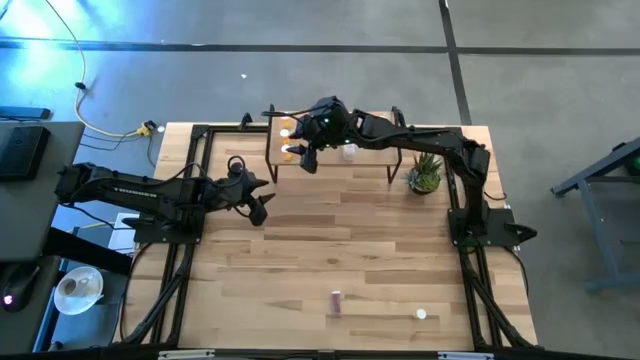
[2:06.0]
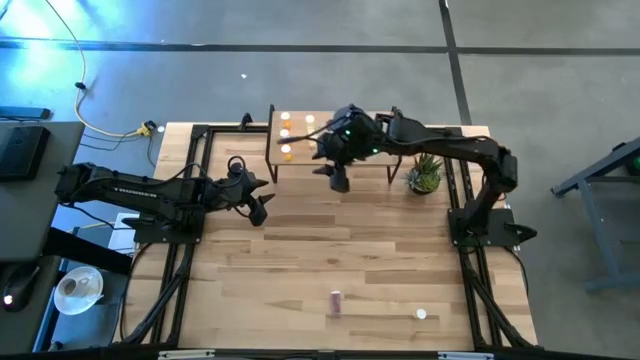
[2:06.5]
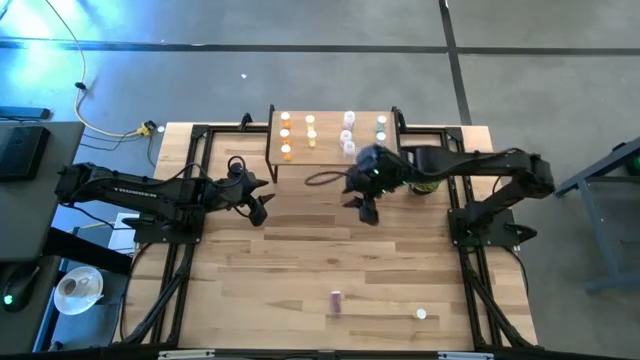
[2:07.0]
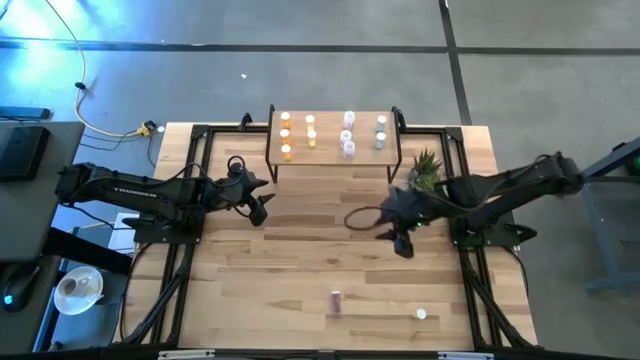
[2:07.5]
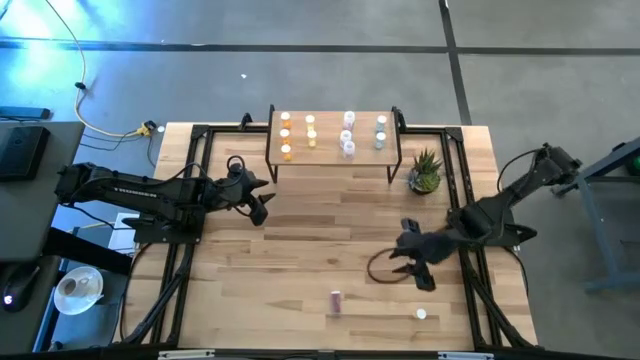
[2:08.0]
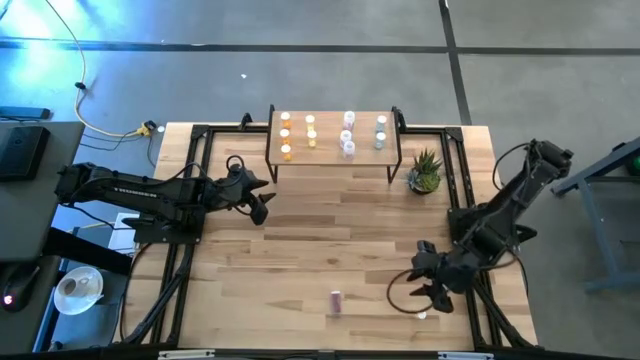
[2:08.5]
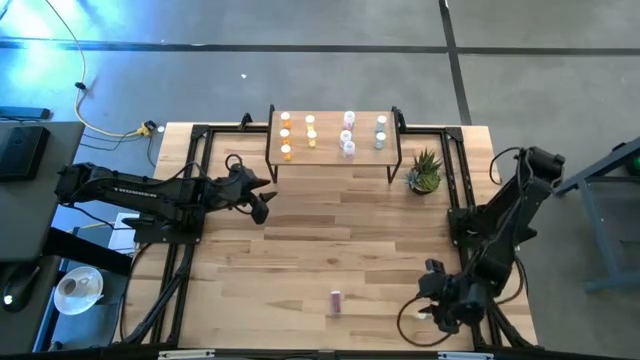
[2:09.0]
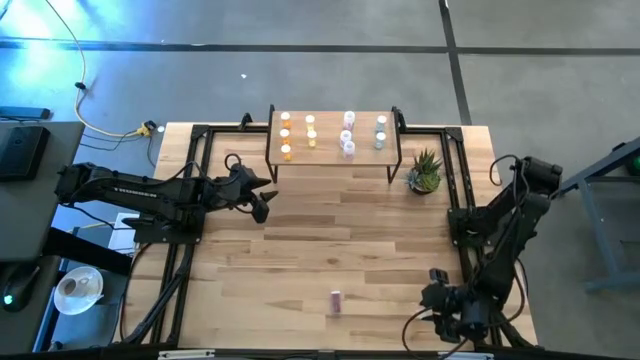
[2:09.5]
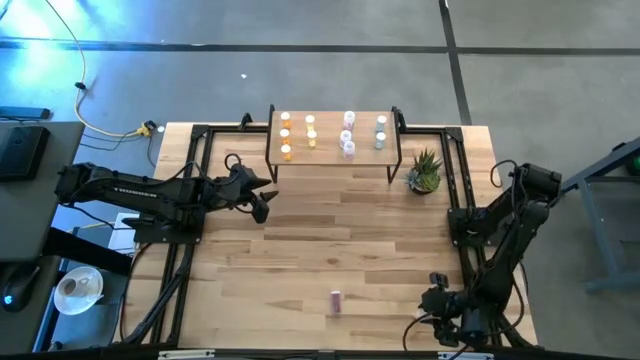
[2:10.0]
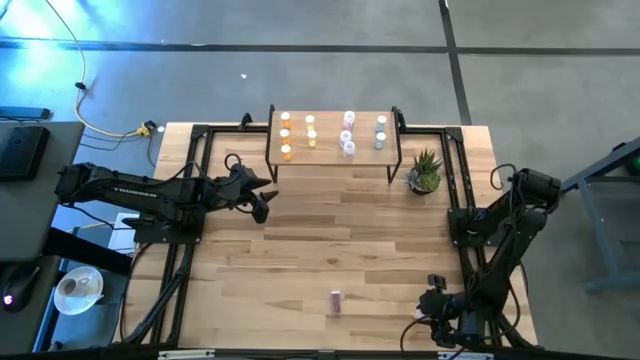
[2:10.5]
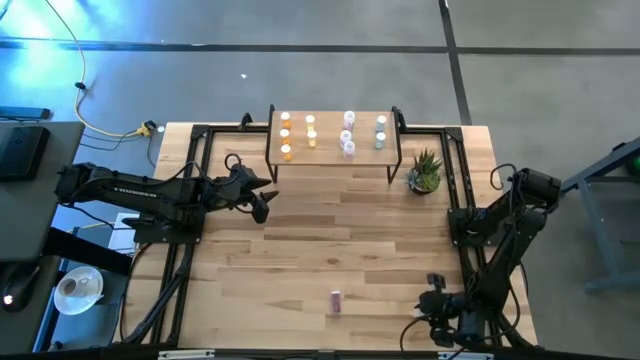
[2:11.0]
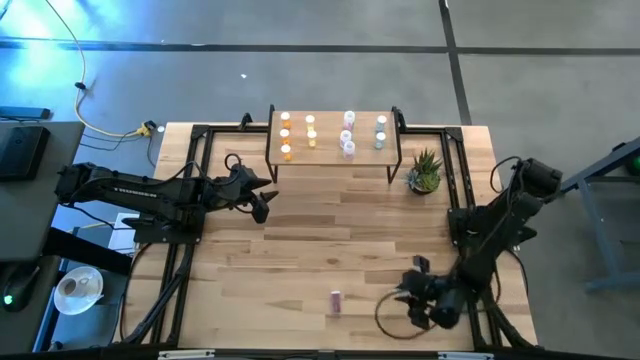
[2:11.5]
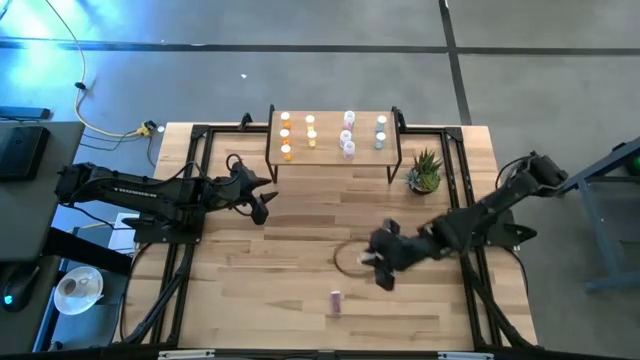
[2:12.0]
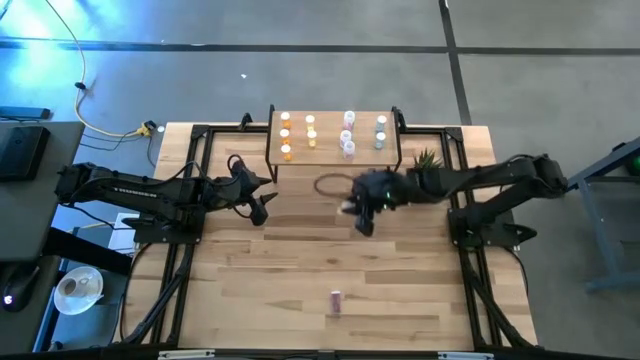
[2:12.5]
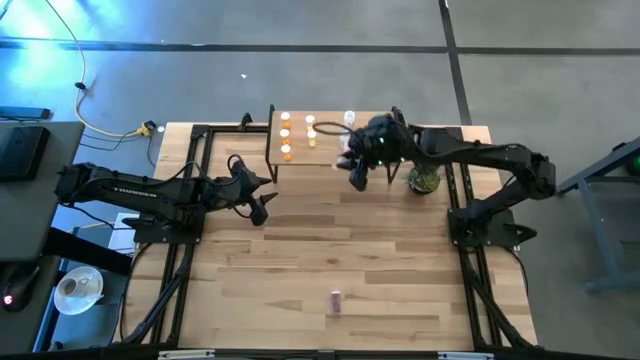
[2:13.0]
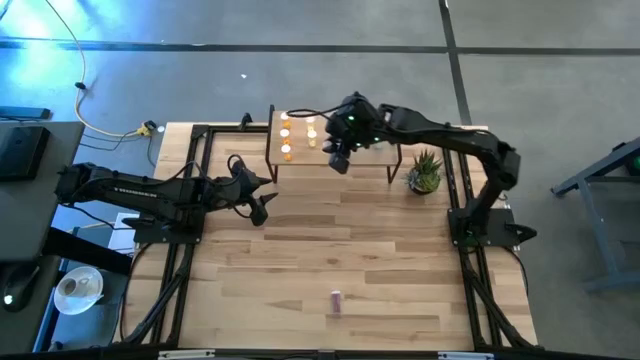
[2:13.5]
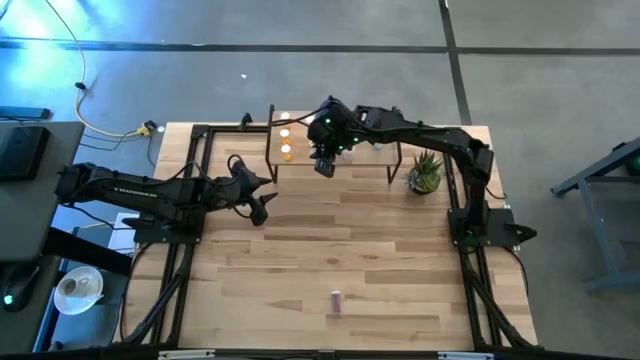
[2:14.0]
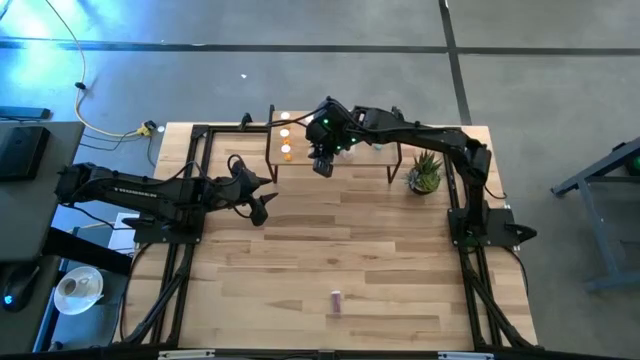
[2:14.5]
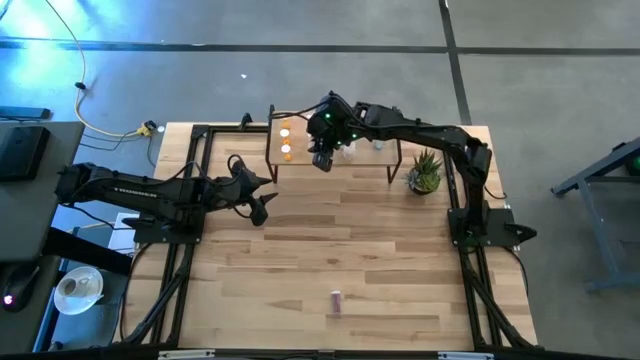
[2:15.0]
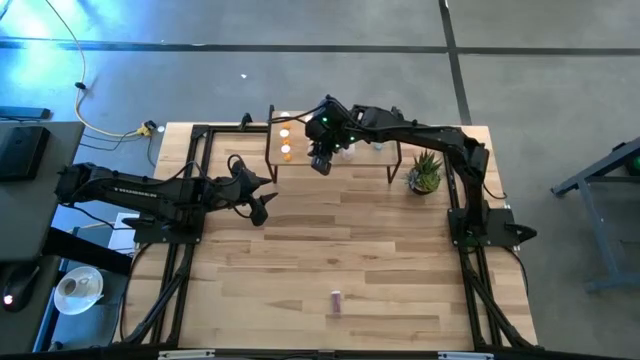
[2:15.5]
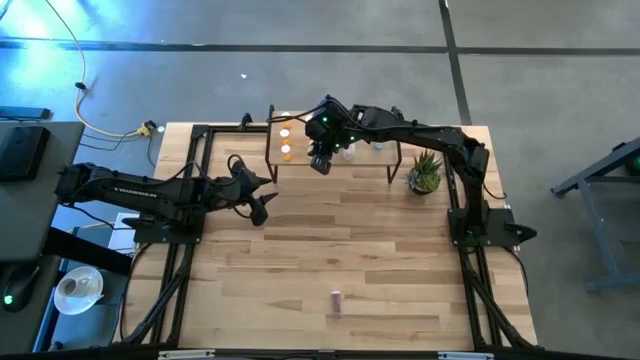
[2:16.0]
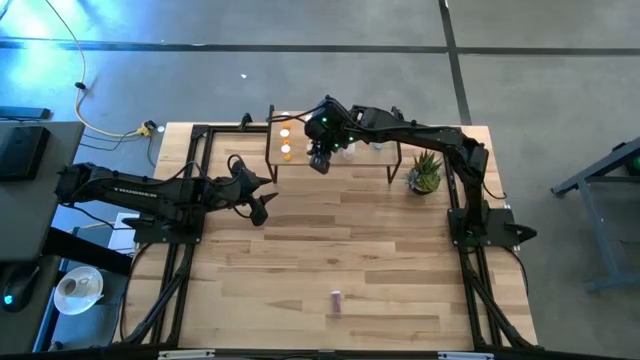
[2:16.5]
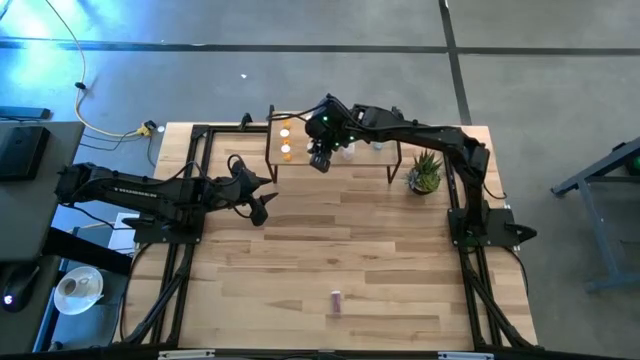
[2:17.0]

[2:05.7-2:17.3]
Task: Pick and place medicine bottles onto shelf by color
Put the yellow pill bottle on the shelf aligned with the other yellow pill bottles

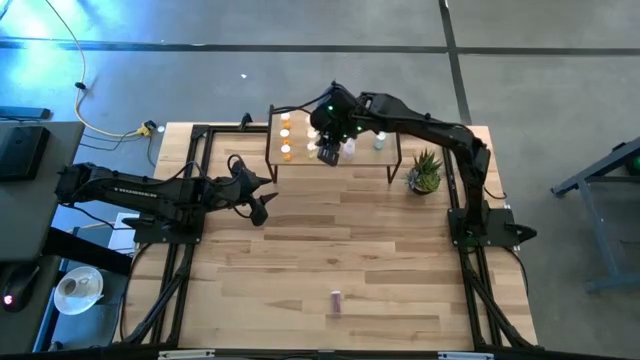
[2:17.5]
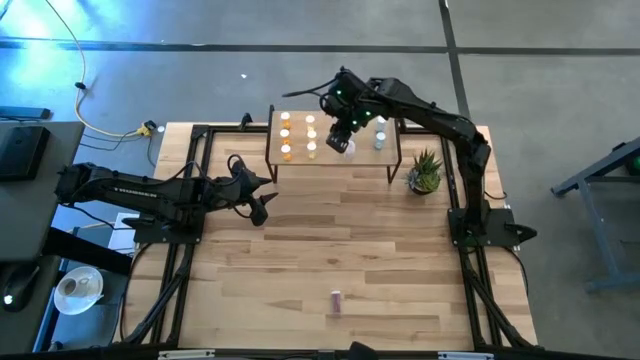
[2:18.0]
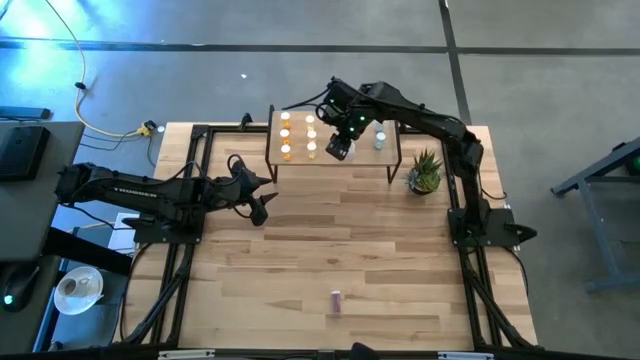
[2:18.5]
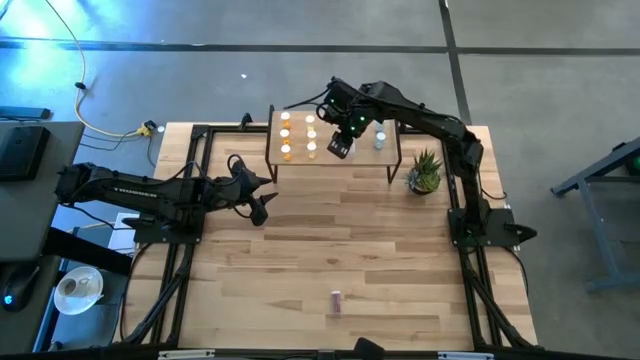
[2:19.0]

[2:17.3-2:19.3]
Adjust the middle white pill bottle on the shelf

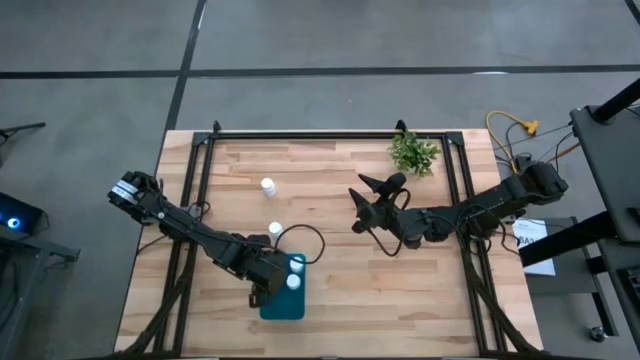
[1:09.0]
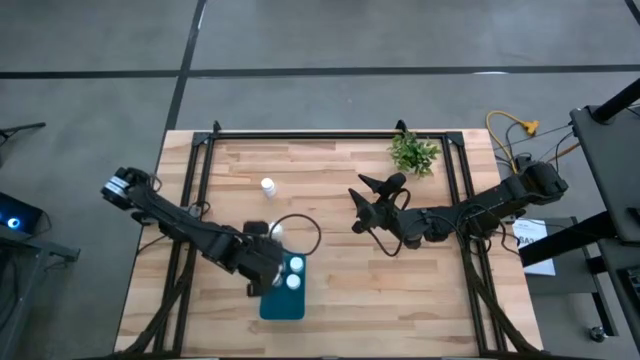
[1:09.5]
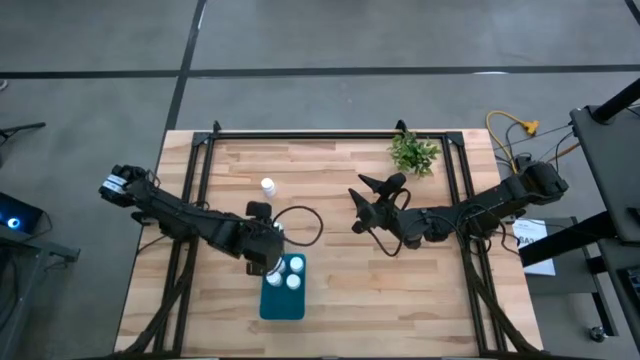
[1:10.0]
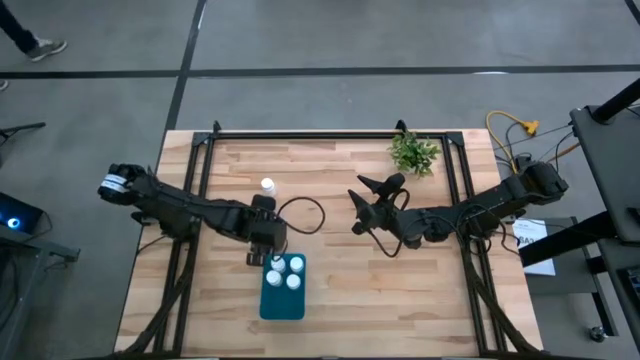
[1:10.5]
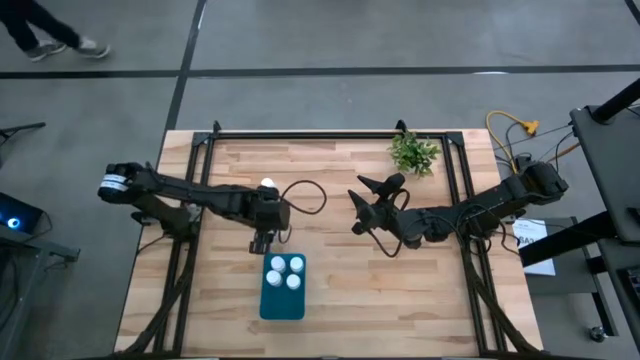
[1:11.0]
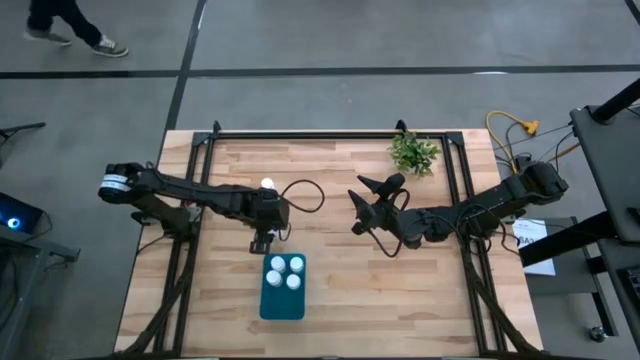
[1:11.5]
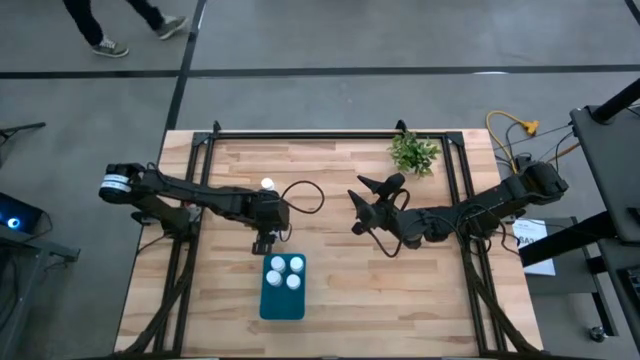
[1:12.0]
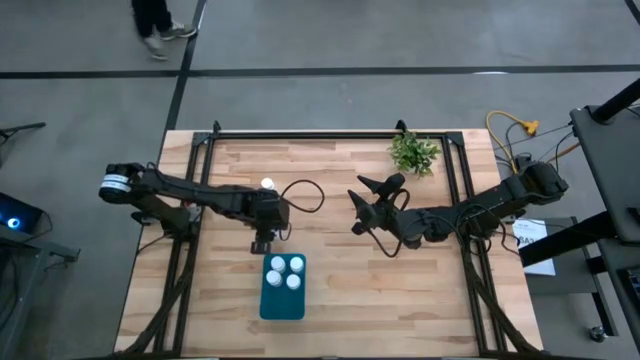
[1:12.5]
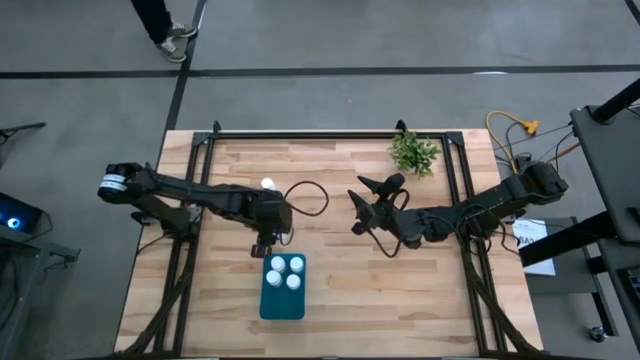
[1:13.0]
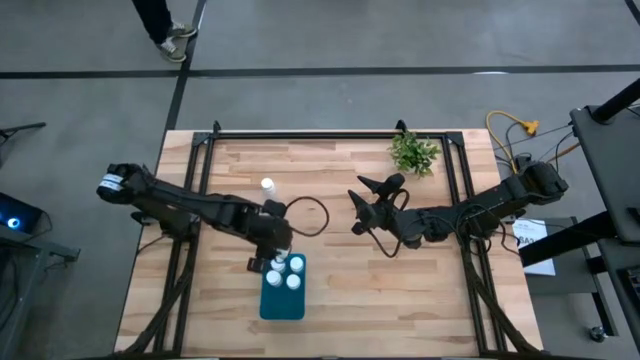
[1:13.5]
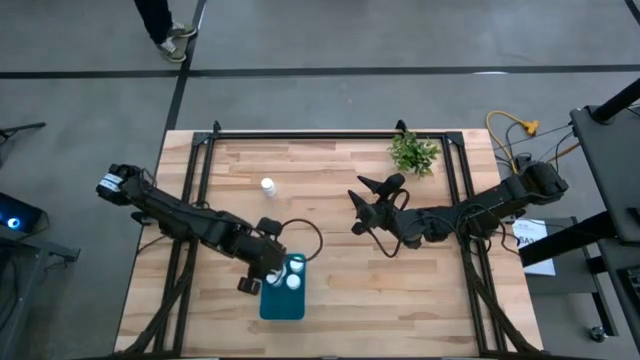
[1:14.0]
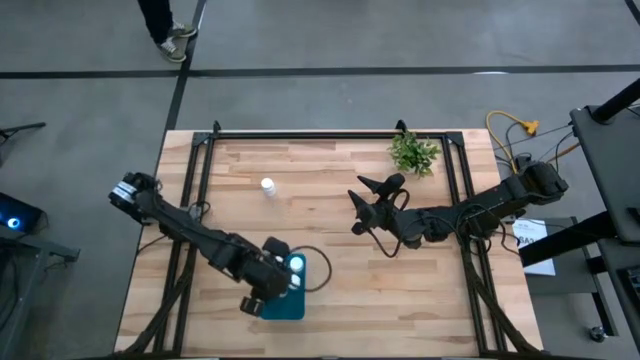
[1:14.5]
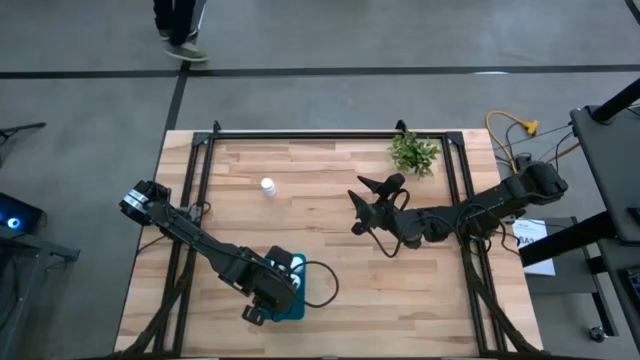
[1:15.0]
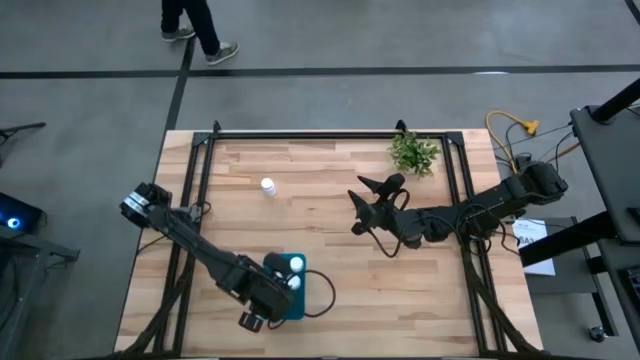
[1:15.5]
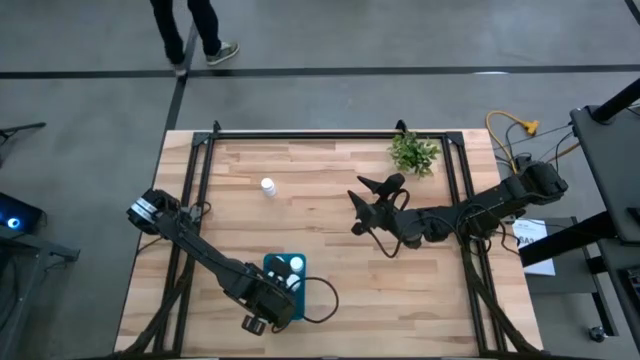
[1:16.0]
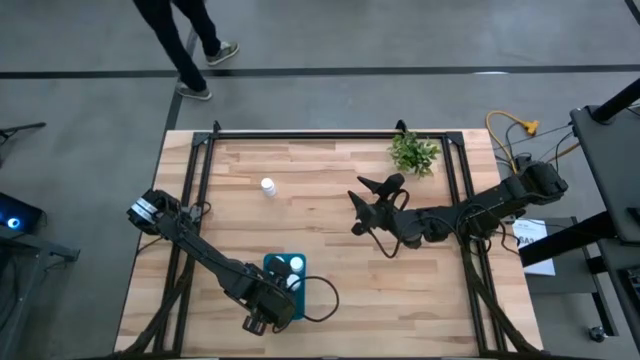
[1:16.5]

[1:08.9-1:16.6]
Task: Pick and place pill bottles into a basket
Put the white pill bottle into the blue bin

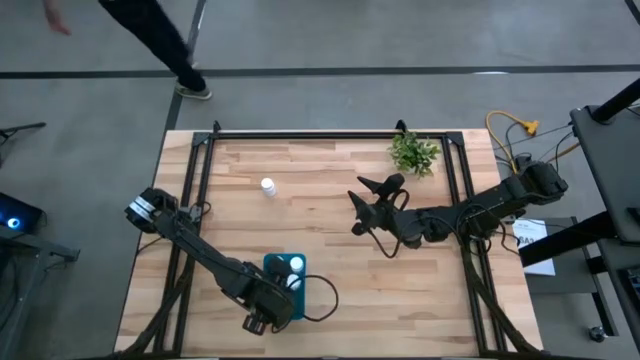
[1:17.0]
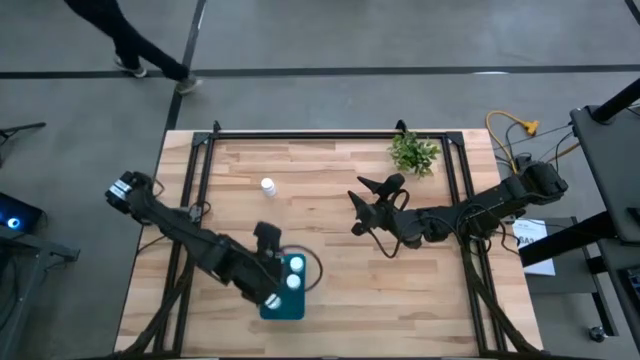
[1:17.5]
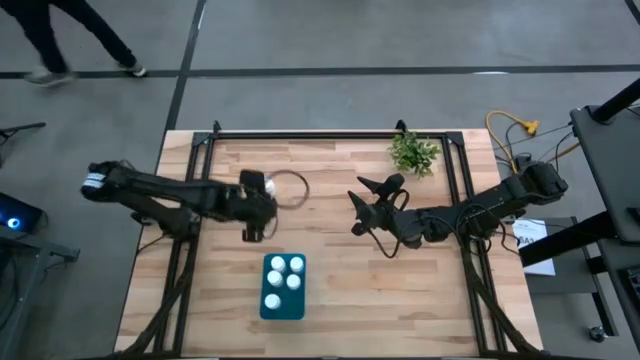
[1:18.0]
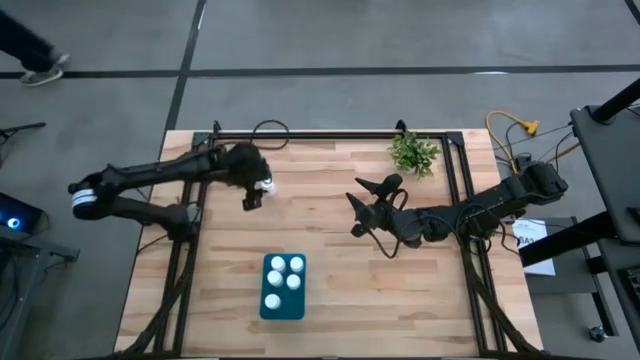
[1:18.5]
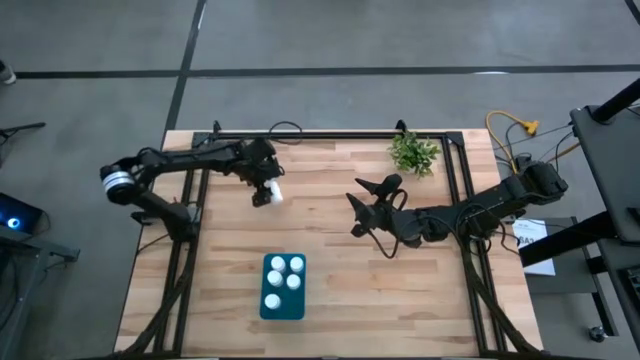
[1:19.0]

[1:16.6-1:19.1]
Put the white pill bottle into the blue bin
